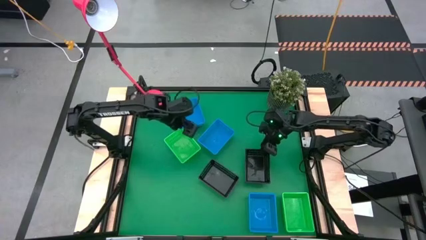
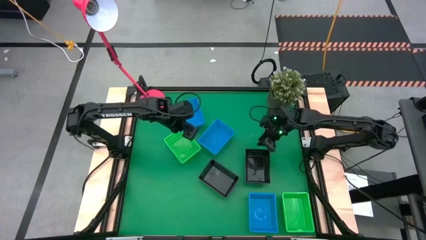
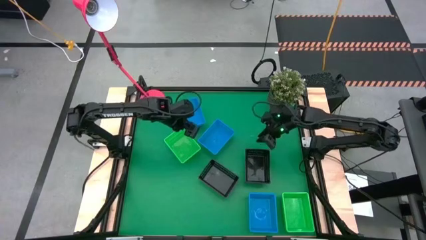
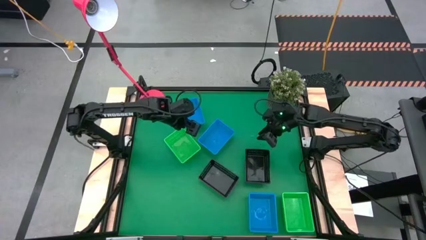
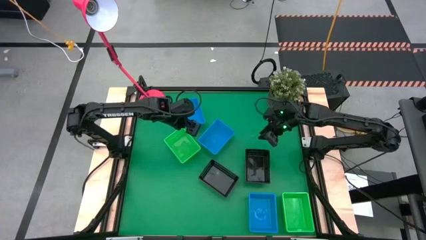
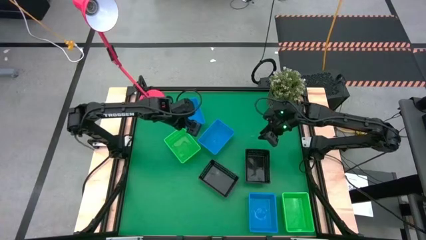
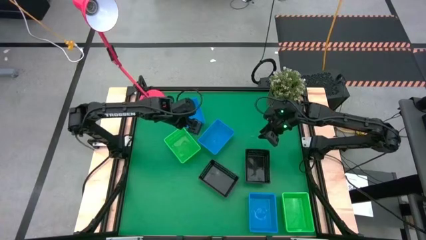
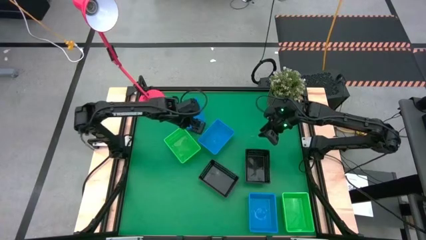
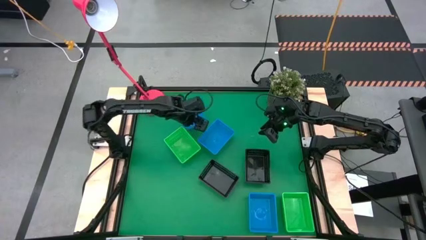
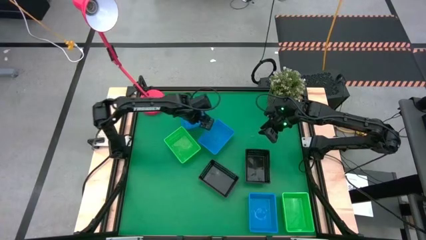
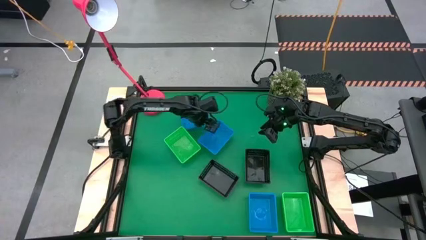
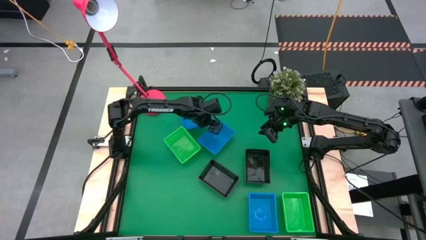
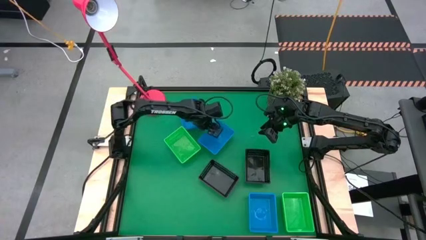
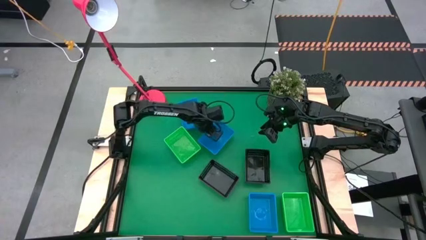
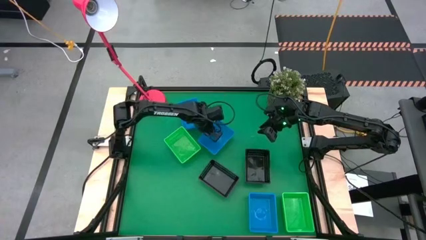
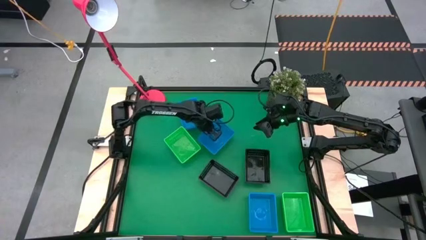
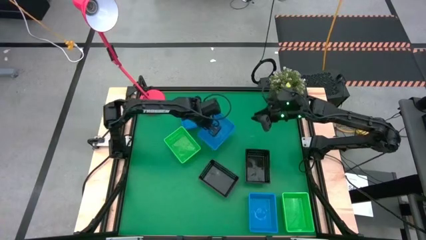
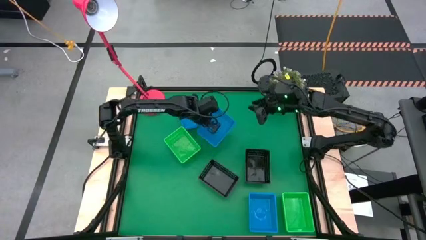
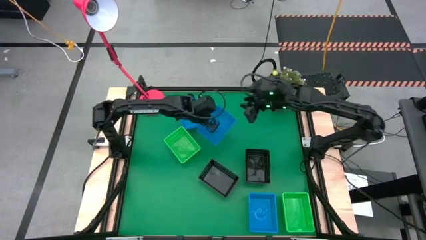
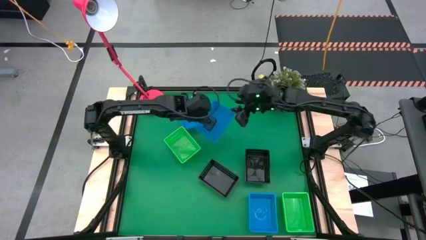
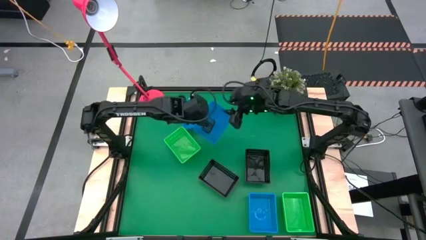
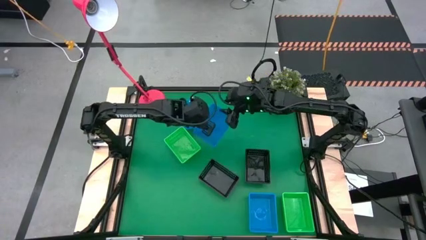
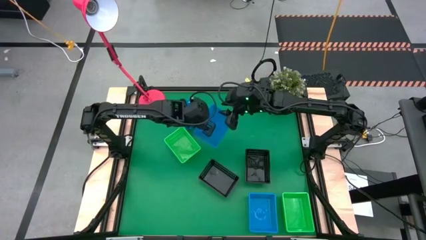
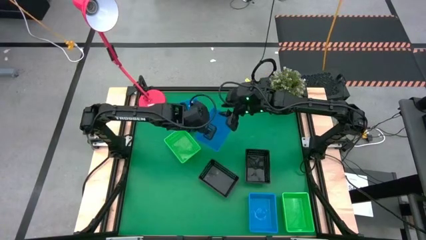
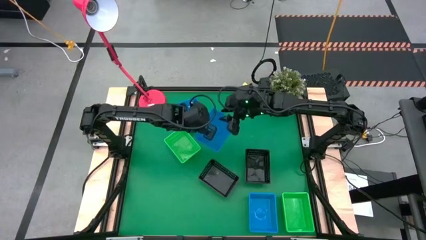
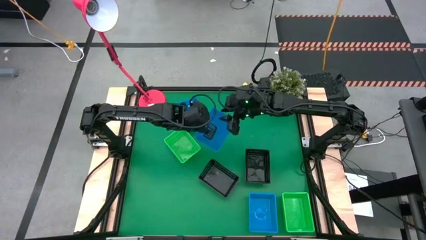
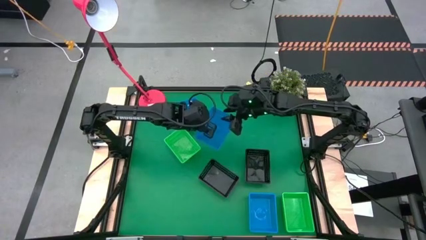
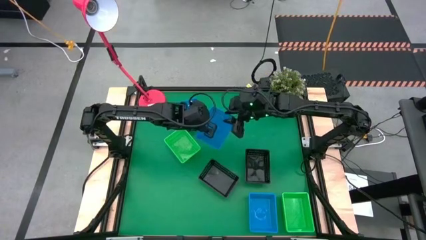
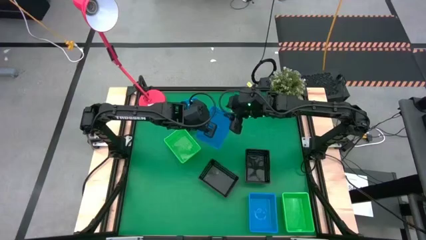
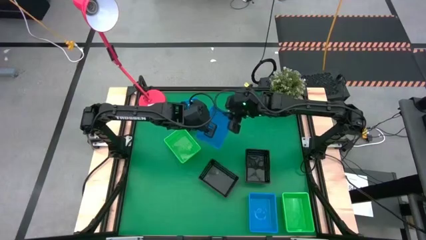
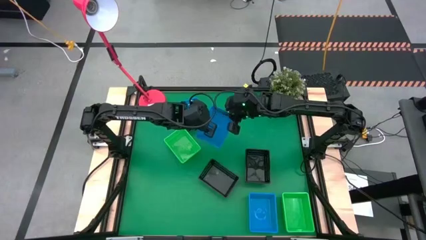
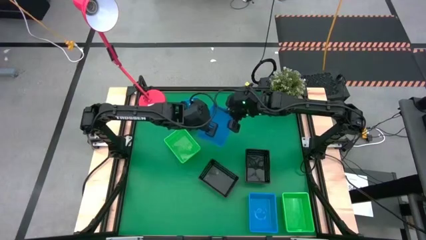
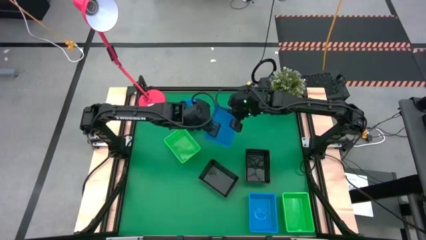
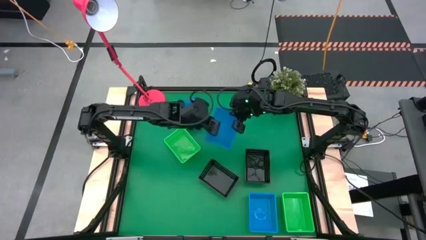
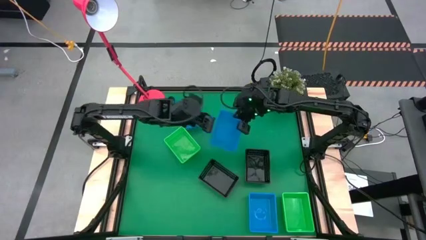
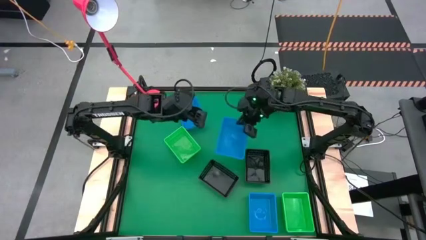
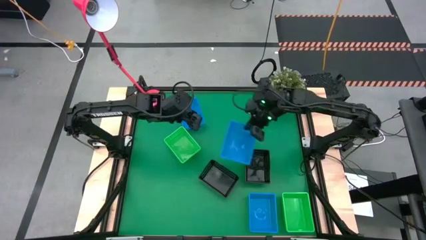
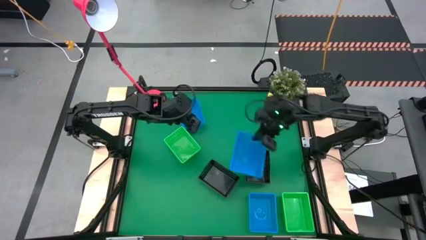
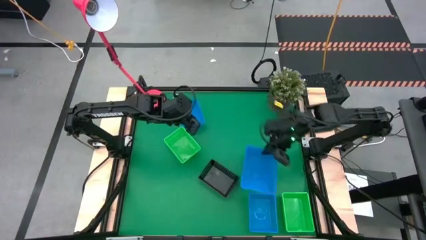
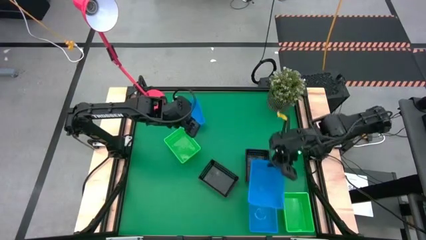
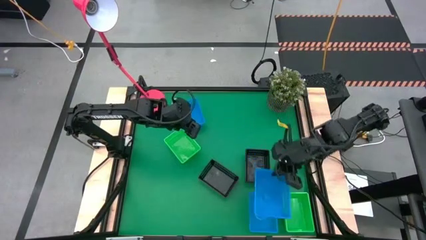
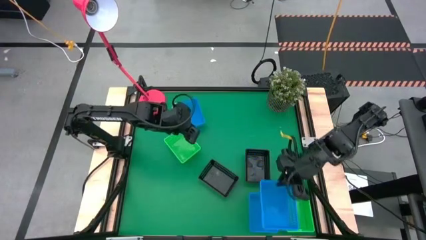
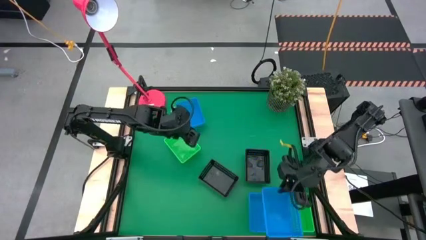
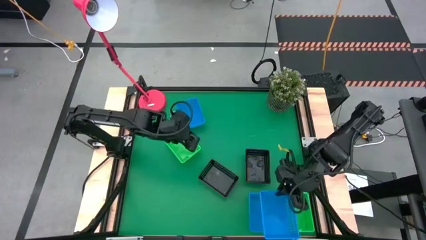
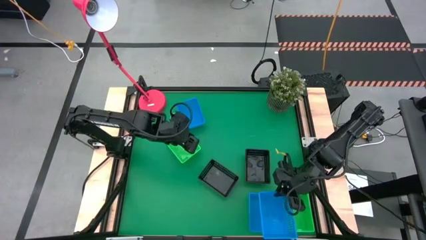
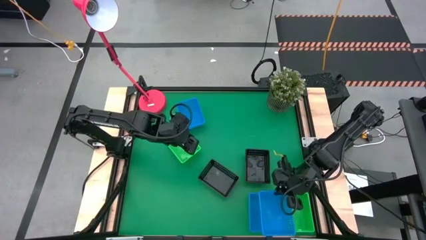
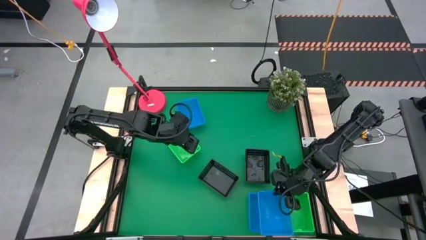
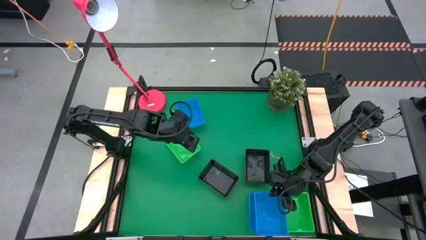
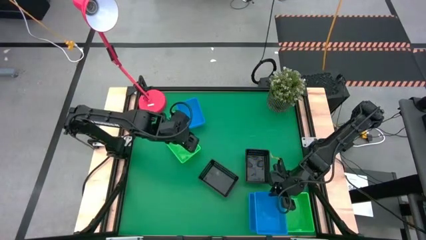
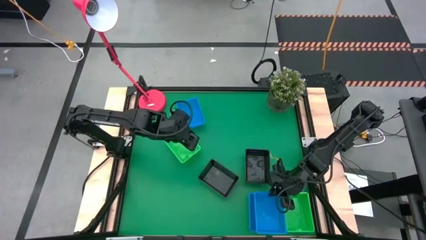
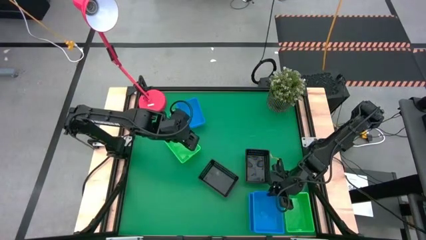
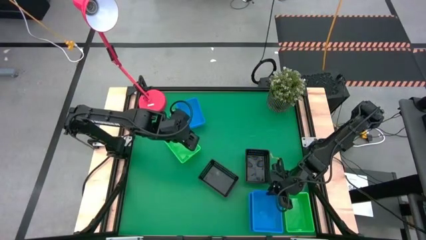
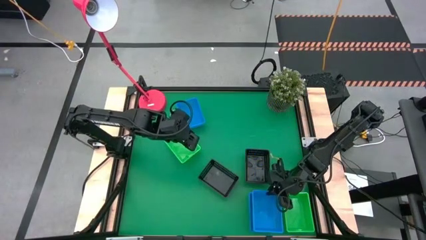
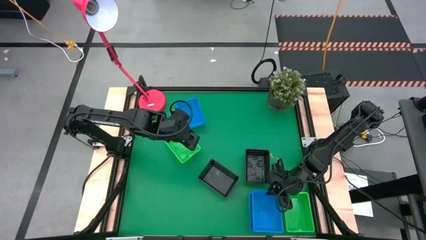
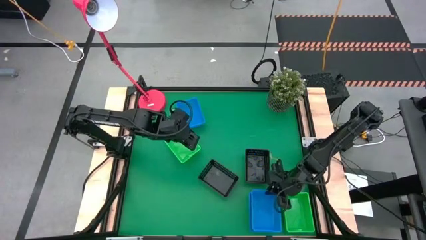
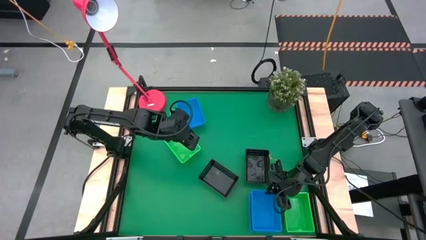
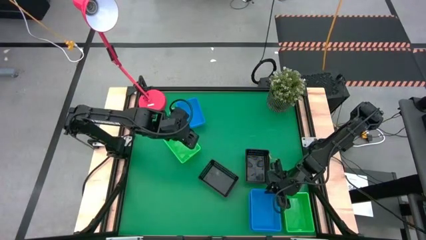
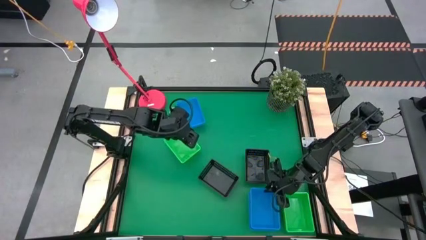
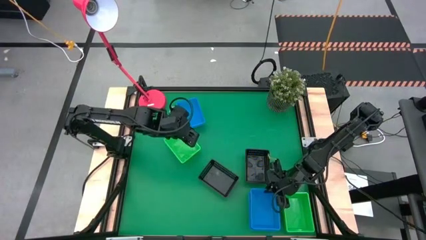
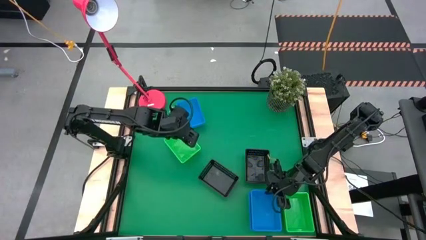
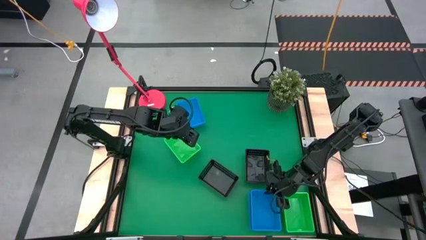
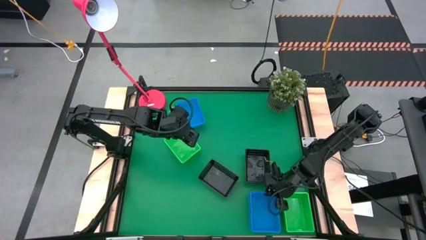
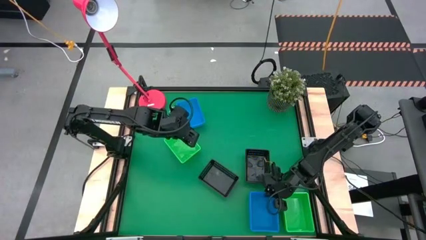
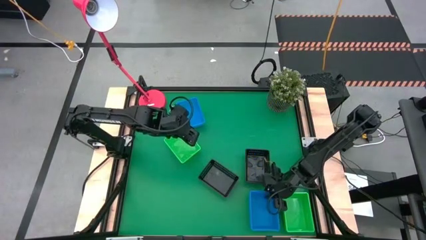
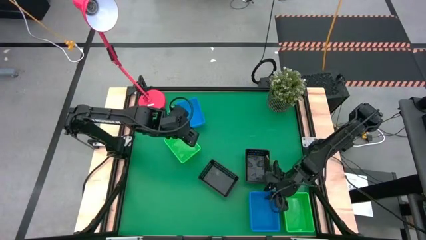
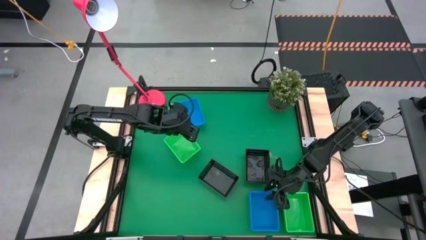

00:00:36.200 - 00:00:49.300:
Stack the middle blue bin on the bottom blue bin
